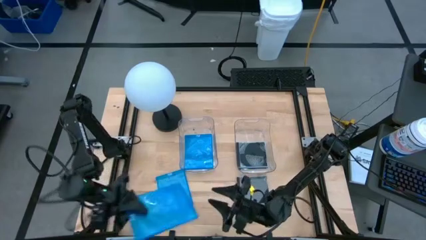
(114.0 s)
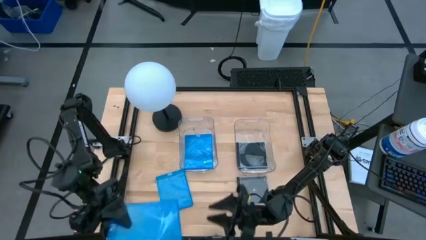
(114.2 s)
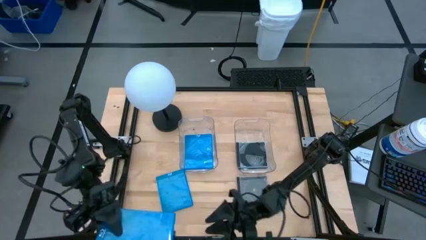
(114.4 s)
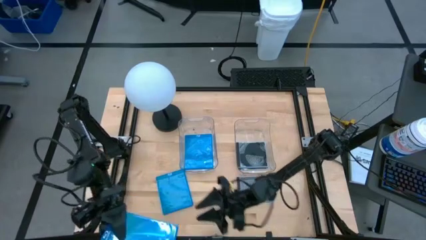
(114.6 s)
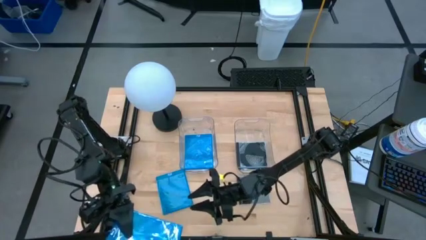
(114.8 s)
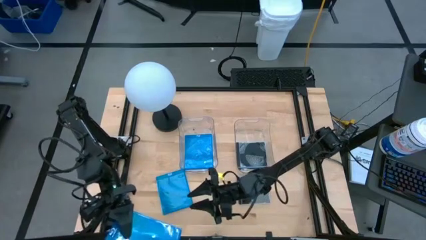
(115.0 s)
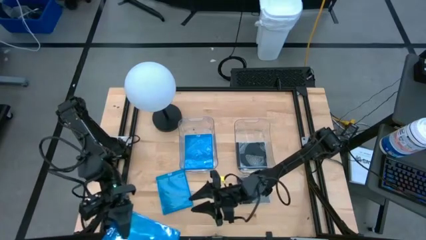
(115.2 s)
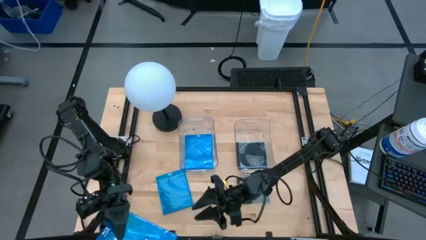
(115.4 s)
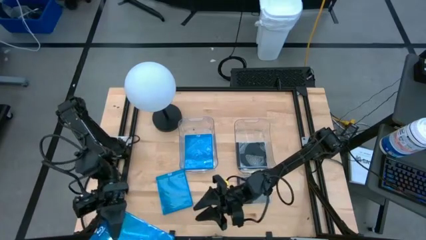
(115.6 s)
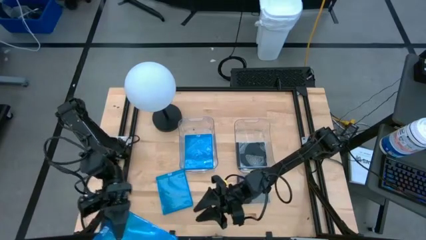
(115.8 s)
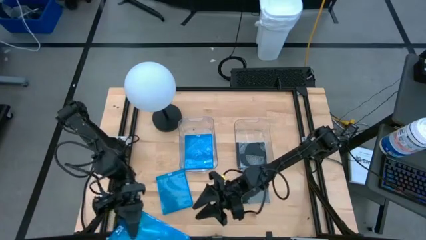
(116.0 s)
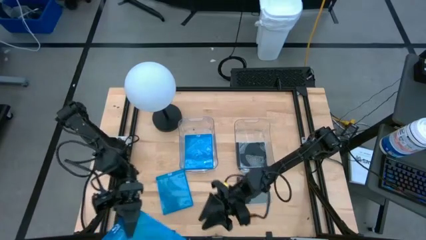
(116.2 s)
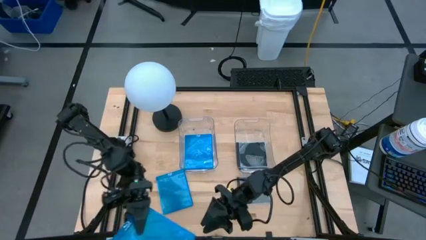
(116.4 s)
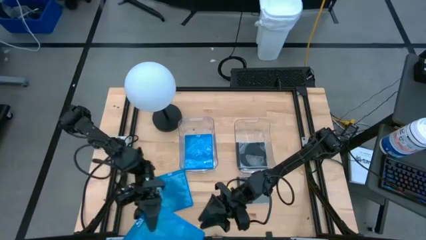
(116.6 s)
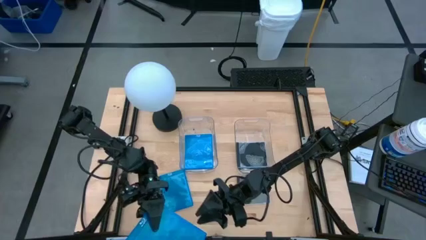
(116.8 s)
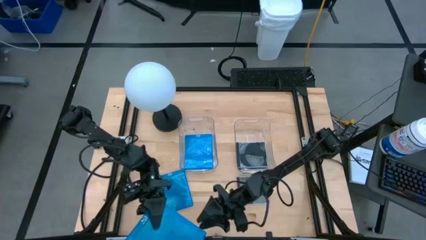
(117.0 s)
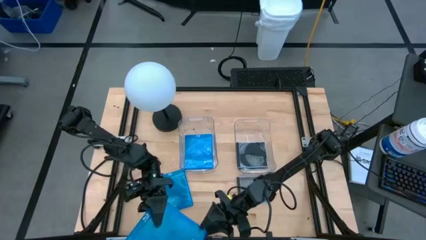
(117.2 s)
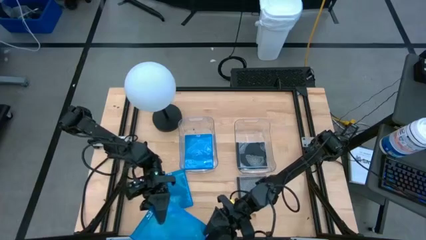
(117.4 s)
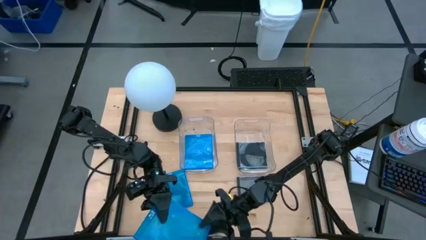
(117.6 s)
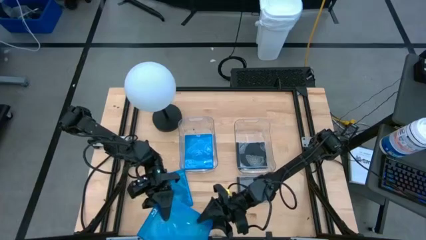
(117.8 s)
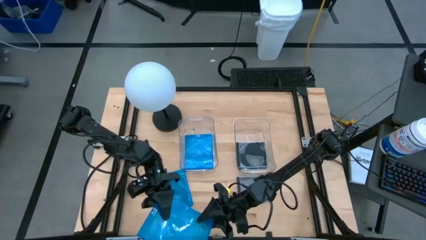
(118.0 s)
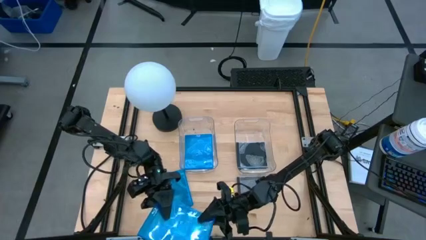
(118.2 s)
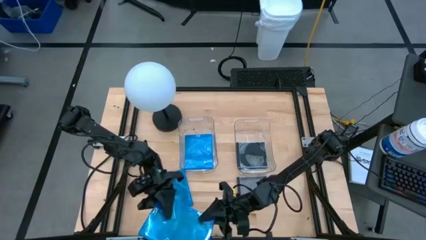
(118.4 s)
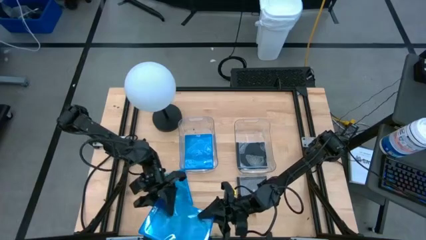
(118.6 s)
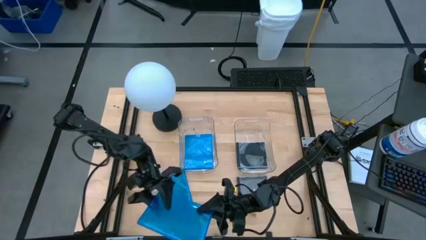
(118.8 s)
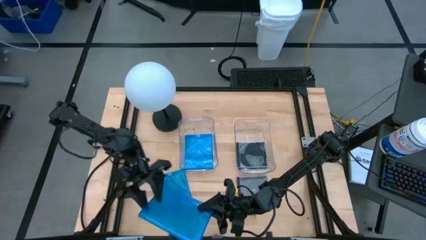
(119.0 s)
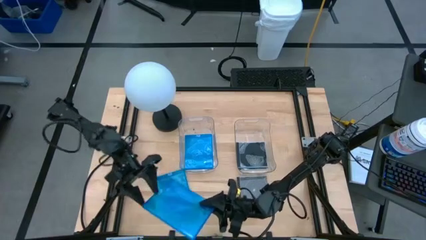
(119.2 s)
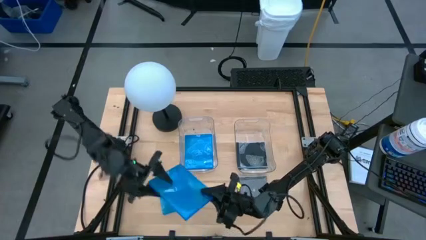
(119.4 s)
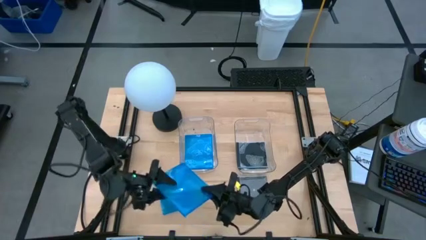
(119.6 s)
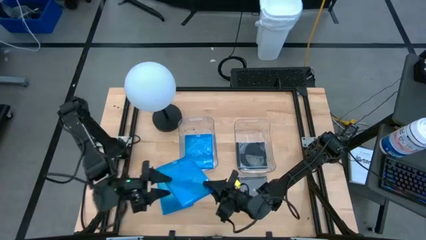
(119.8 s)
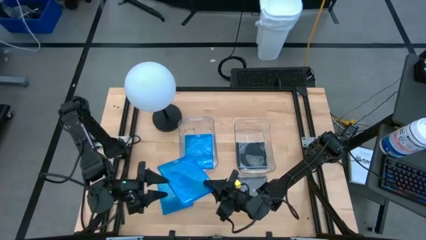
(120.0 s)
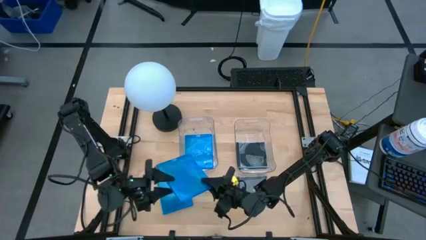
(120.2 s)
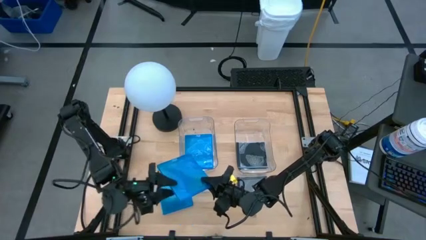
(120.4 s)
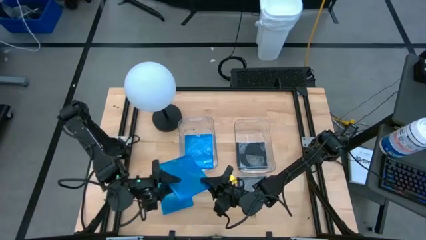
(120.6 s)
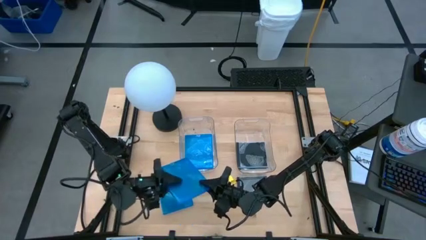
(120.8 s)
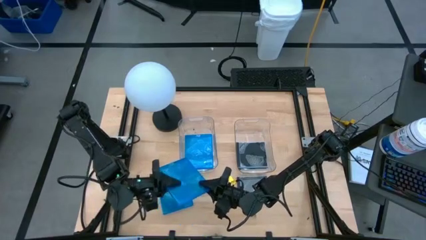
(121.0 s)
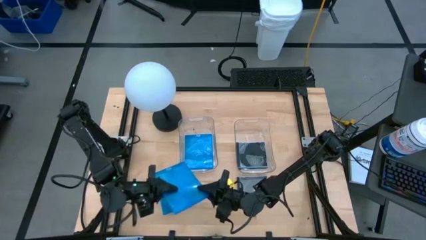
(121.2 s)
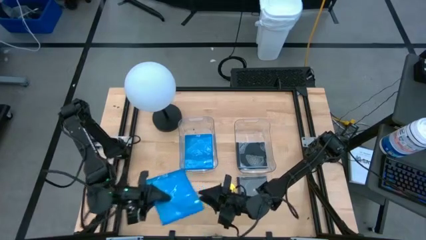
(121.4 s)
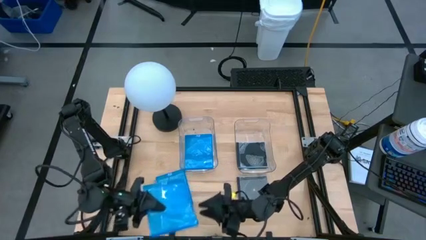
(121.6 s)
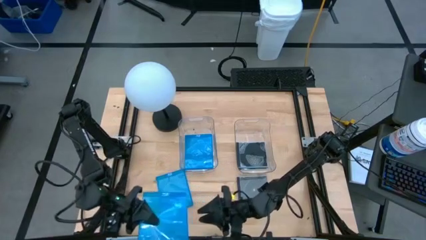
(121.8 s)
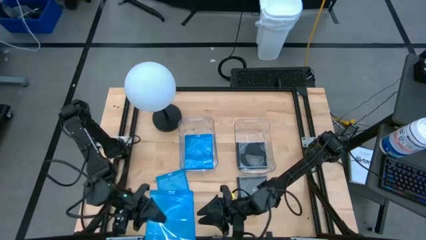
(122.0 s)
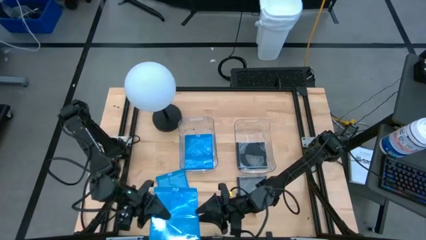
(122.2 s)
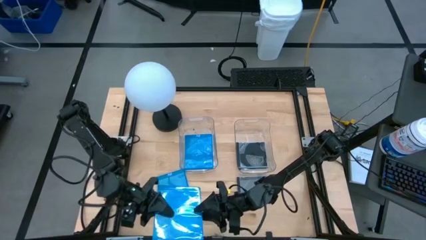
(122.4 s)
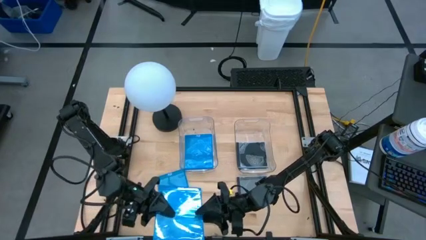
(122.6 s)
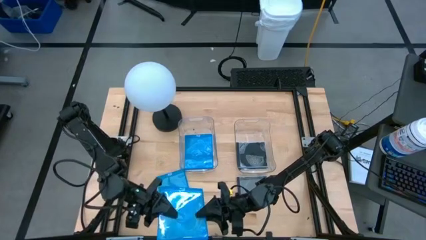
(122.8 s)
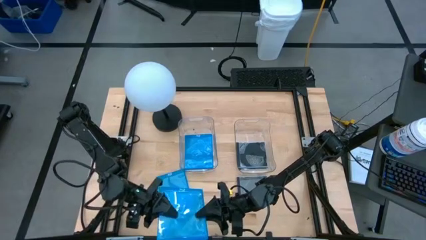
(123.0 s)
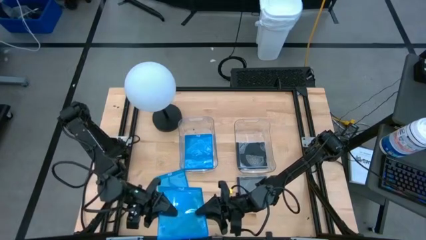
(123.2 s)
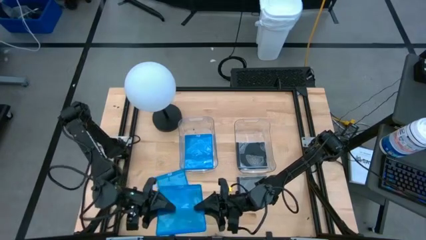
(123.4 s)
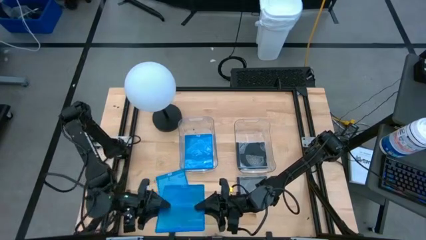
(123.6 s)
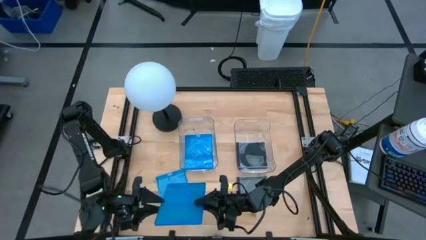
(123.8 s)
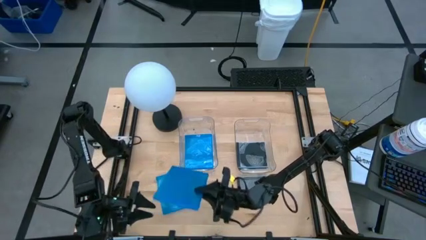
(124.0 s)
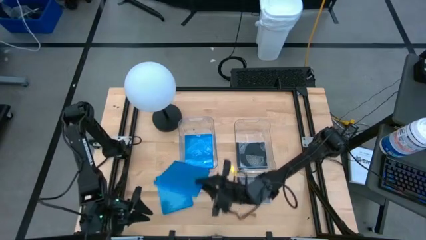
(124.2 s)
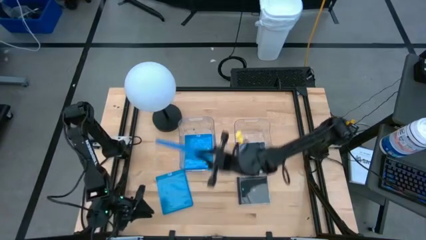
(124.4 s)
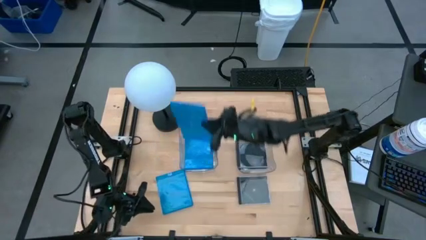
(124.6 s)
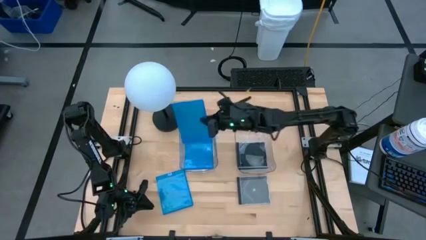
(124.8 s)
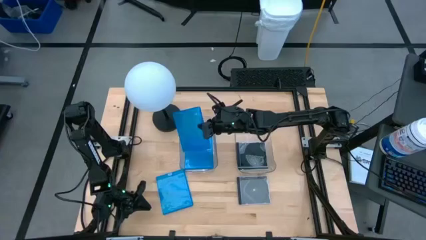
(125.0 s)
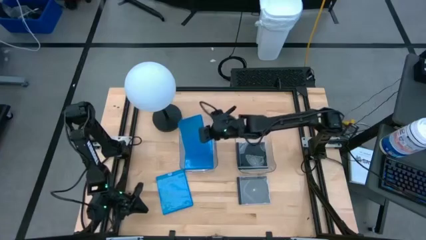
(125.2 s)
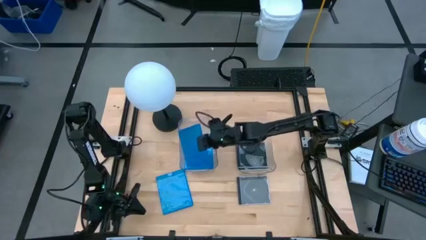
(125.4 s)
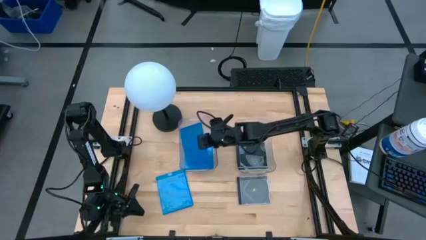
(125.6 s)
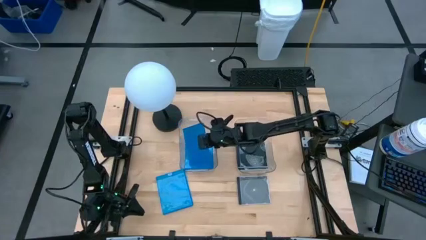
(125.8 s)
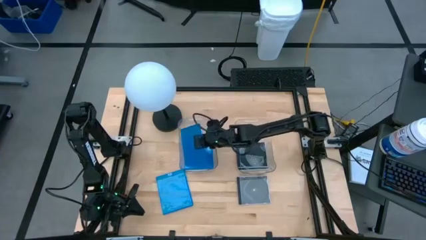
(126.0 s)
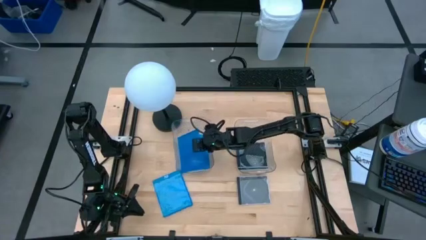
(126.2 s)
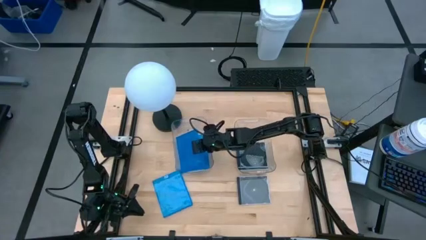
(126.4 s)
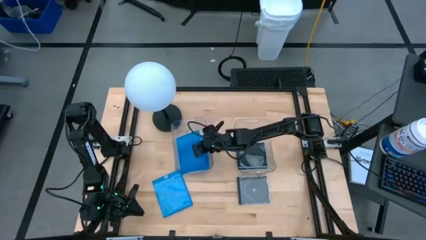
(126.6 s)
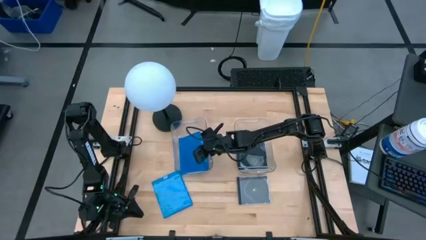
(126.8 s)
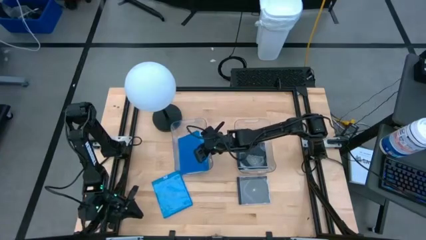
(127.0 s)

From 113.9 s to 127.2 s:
Task: Pick & place jewel cases by type
Put the blue CD case into the left transparent bin

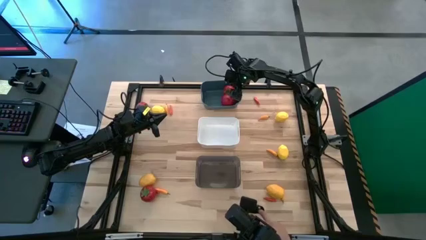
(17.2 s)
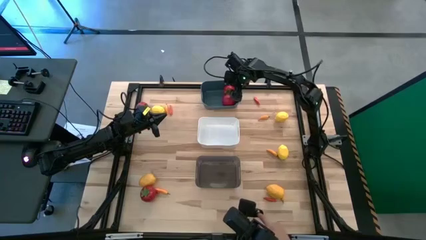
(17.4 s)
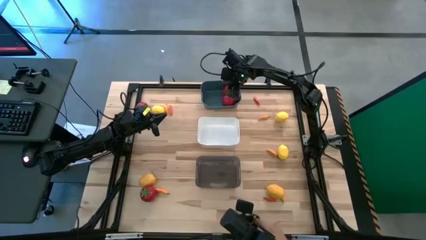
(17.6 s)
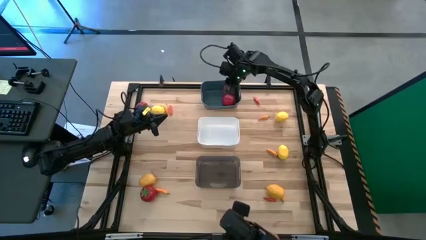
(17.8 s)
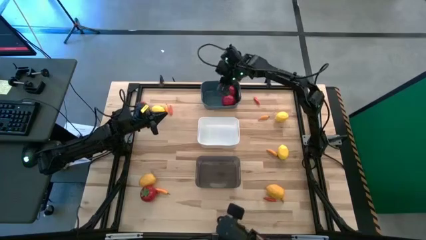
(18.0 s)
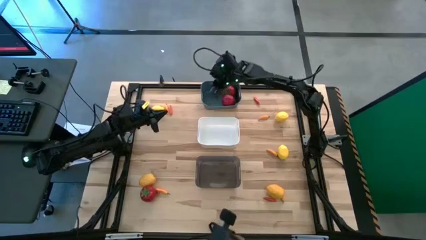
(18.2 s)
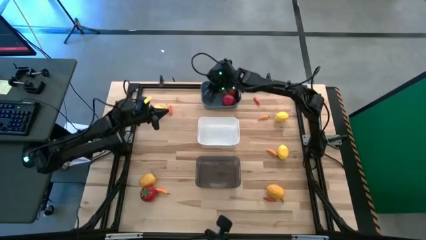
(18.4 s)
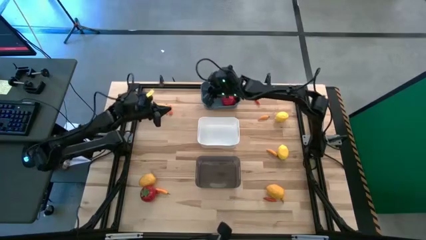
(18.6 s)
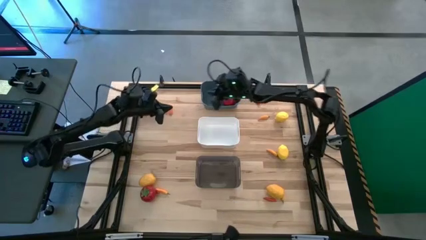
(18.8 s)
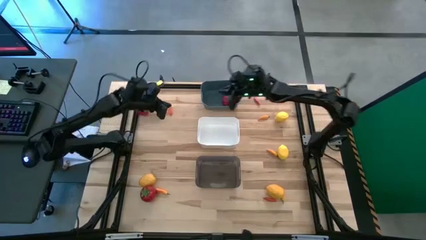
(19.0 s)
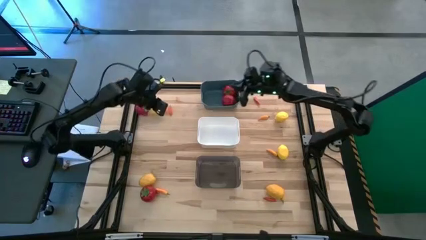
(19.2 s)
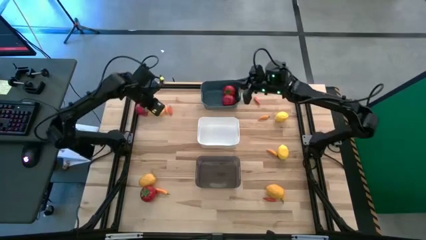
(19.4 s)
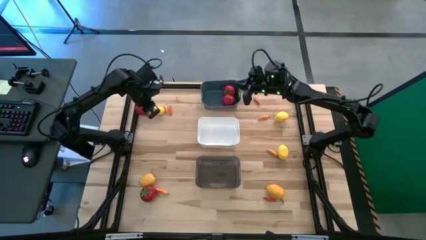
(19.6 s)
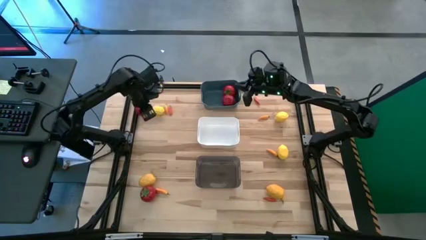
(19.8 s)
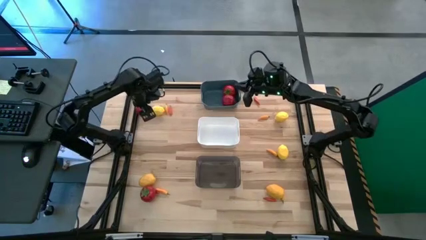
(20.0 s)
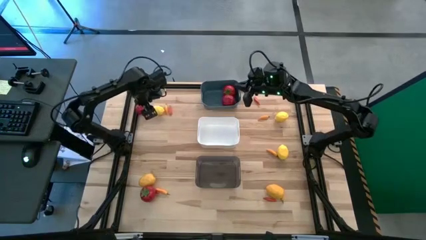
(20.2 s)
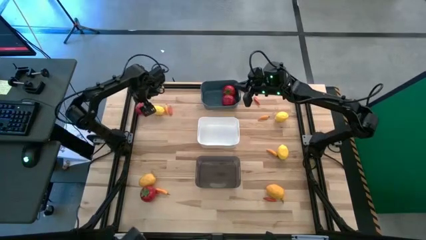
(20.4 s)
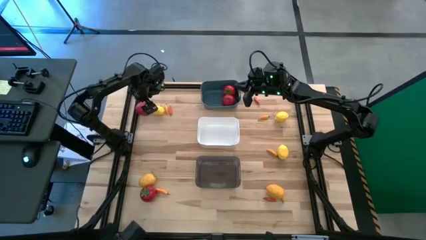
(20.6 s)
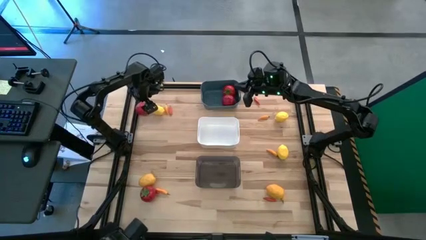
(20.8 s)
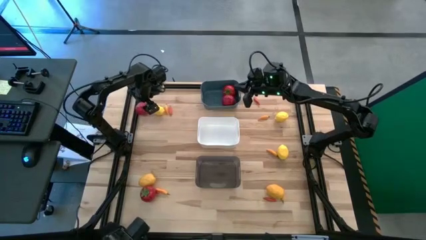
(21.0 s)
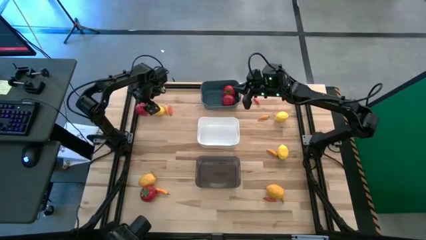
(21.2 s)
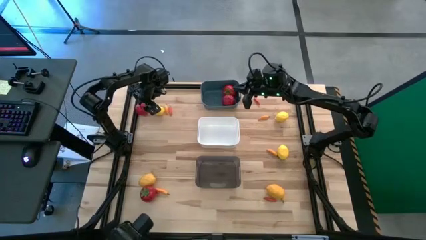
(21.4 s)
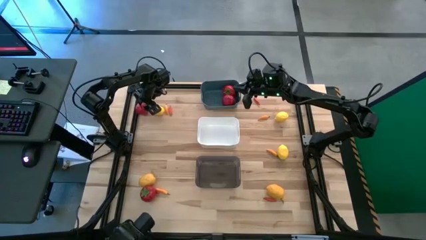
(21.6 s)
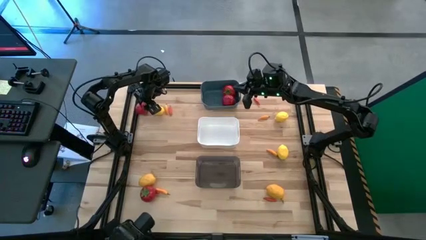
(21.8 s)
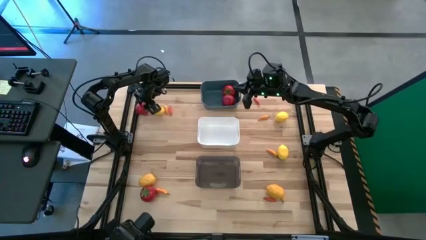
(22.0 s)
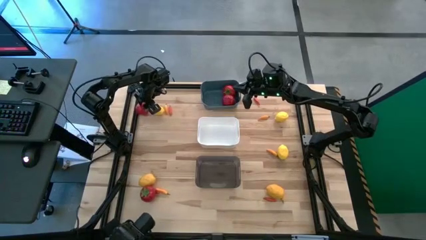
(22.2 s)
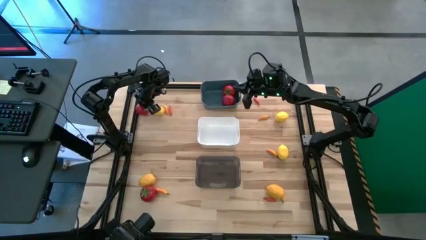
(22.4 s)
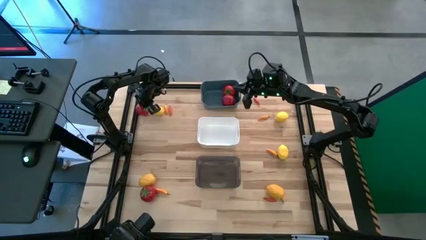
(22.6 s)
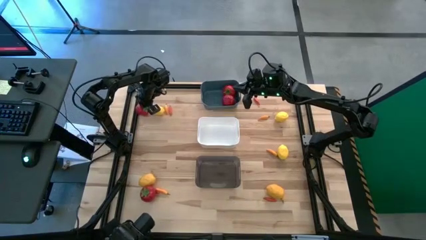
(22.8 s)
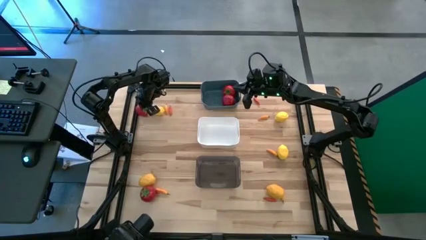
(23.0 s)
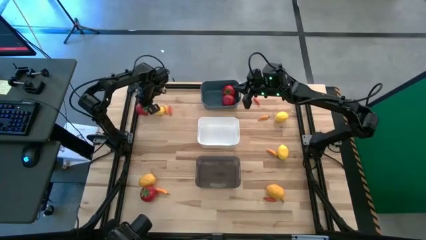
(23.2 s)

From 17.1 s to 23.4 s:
Task: Sort produce into baskets
Put the red tomato into the blue bin
